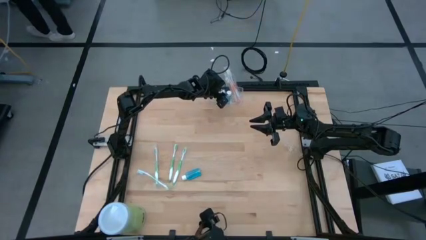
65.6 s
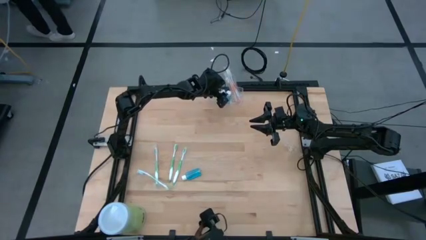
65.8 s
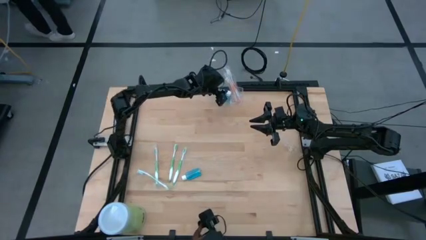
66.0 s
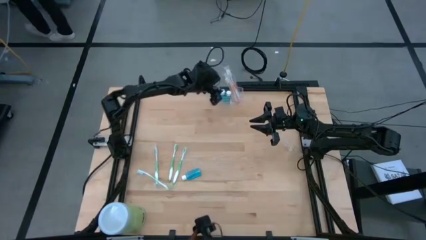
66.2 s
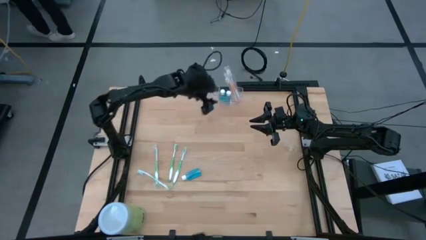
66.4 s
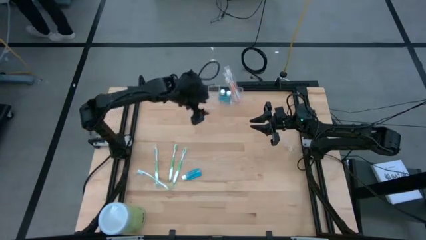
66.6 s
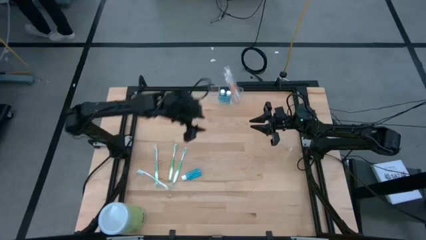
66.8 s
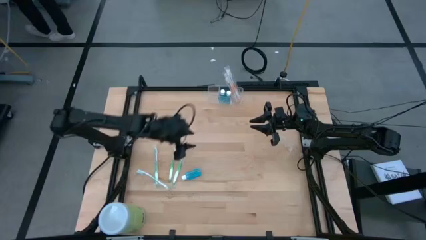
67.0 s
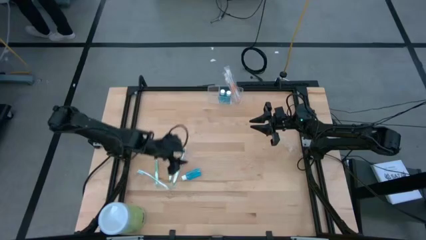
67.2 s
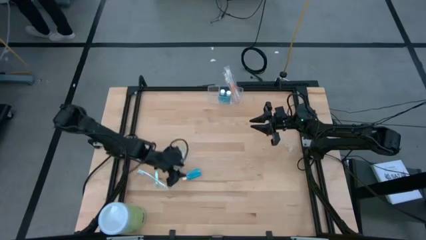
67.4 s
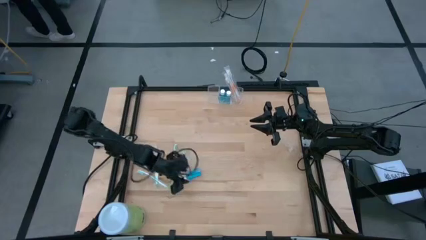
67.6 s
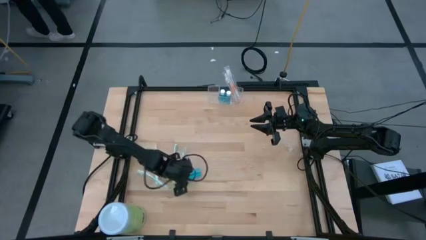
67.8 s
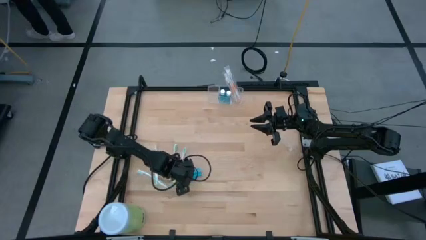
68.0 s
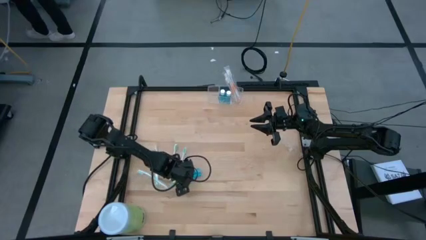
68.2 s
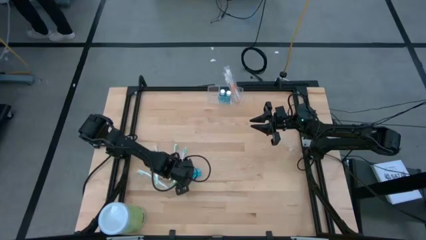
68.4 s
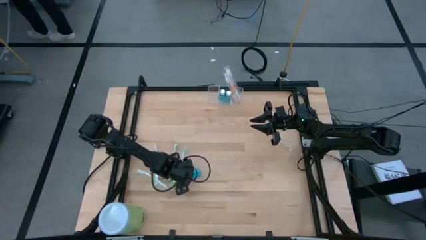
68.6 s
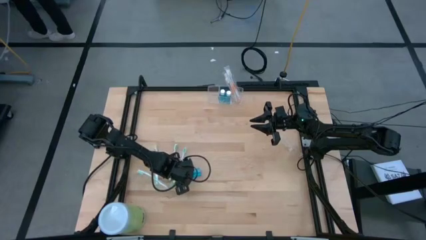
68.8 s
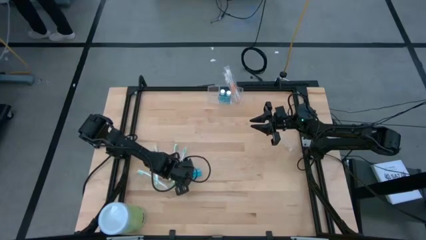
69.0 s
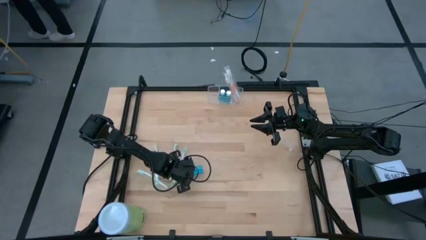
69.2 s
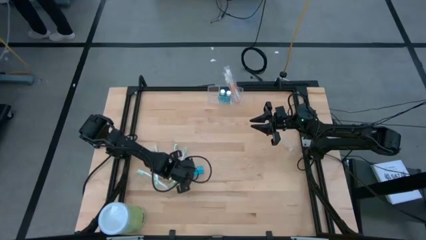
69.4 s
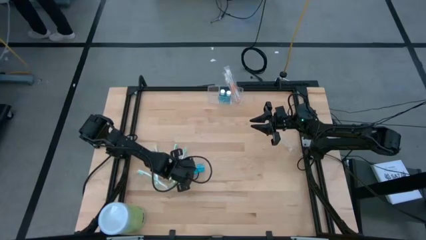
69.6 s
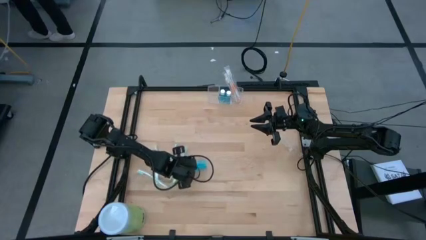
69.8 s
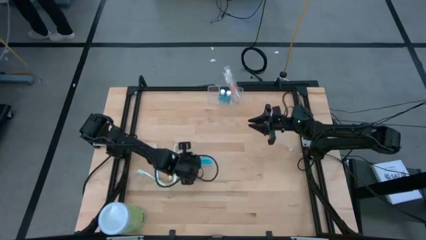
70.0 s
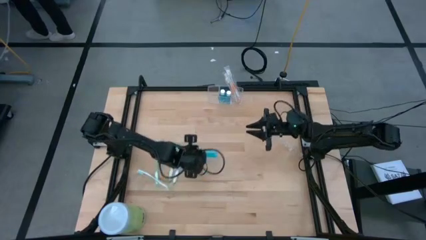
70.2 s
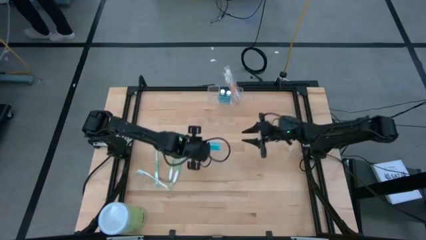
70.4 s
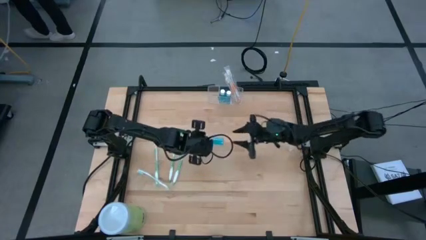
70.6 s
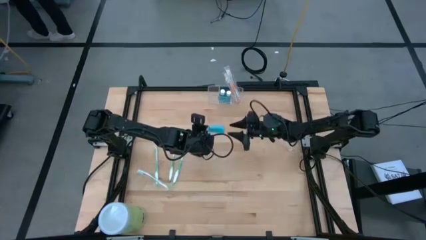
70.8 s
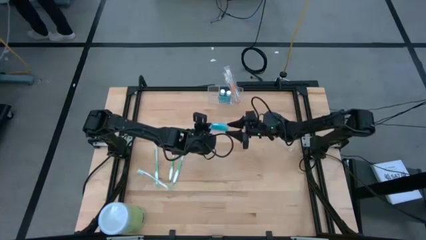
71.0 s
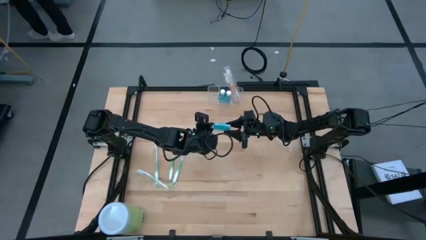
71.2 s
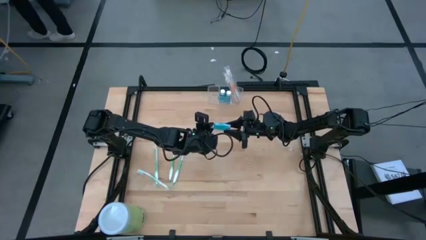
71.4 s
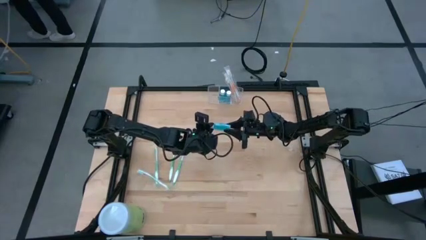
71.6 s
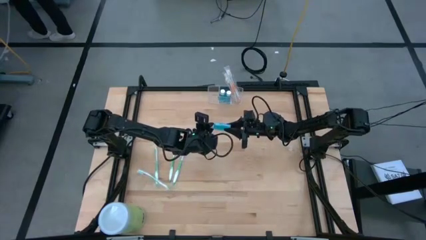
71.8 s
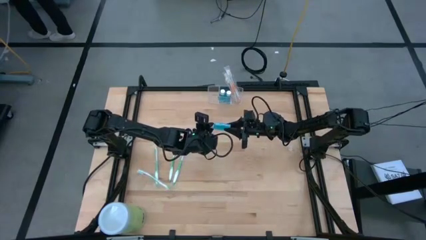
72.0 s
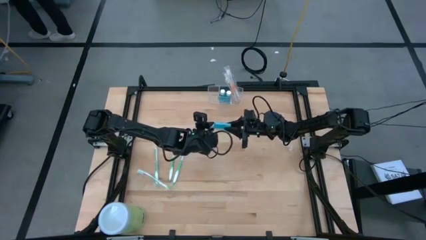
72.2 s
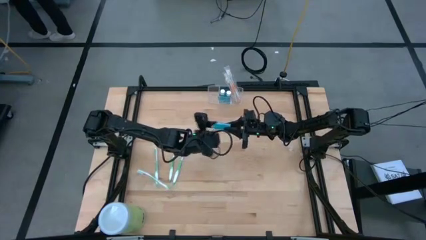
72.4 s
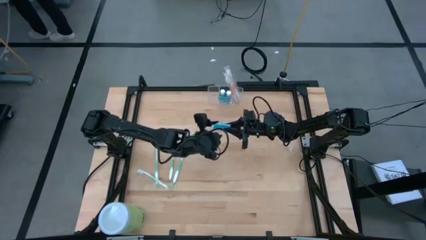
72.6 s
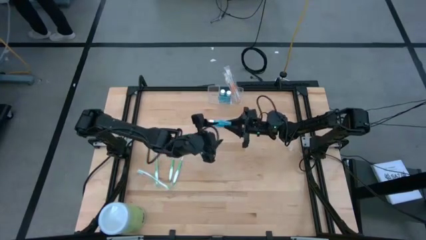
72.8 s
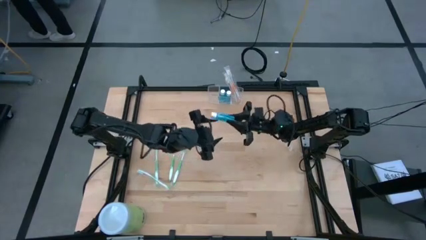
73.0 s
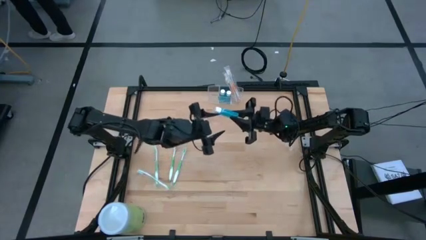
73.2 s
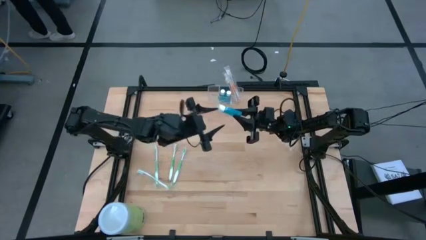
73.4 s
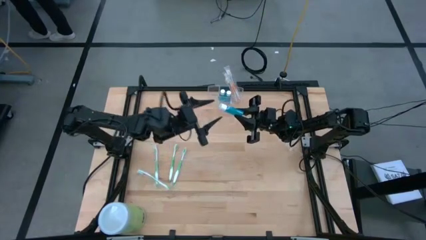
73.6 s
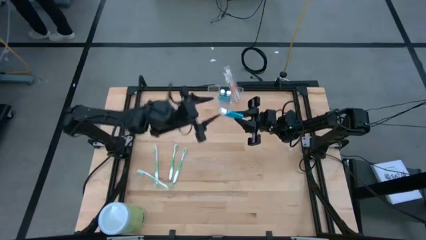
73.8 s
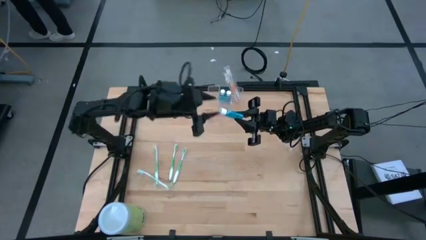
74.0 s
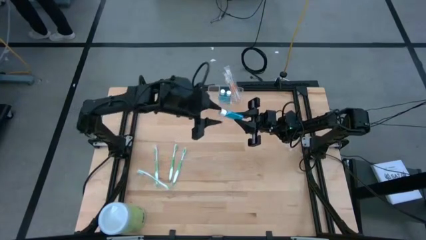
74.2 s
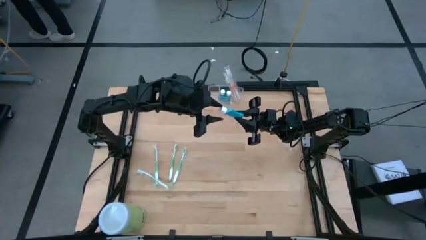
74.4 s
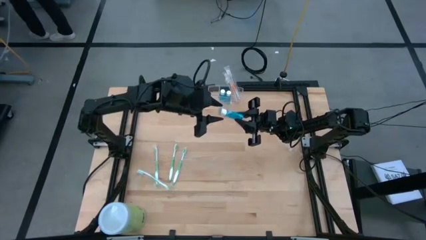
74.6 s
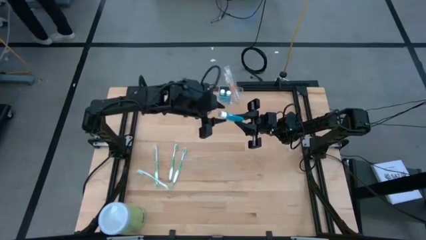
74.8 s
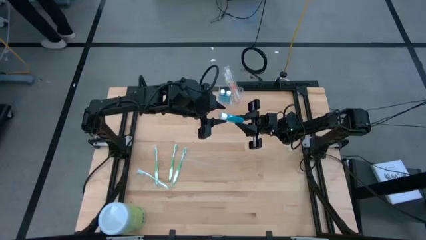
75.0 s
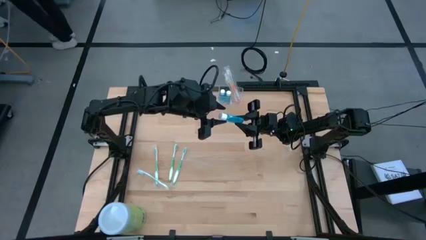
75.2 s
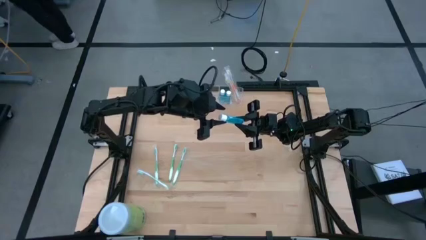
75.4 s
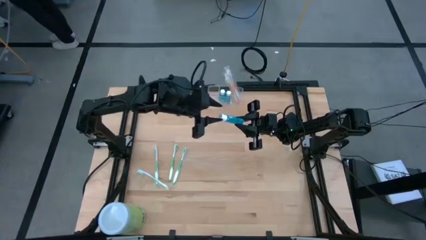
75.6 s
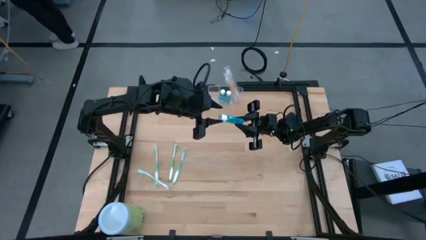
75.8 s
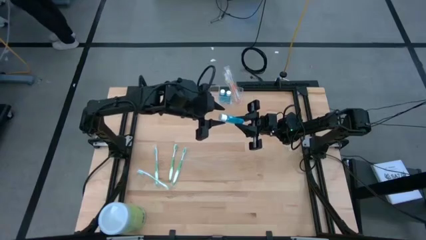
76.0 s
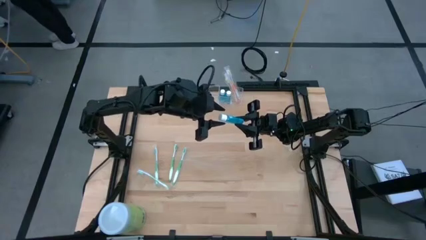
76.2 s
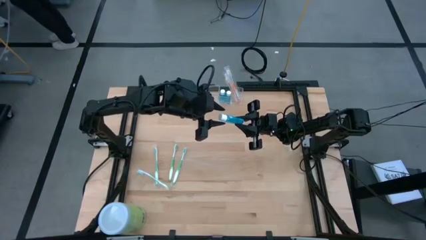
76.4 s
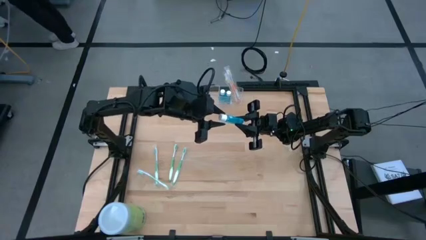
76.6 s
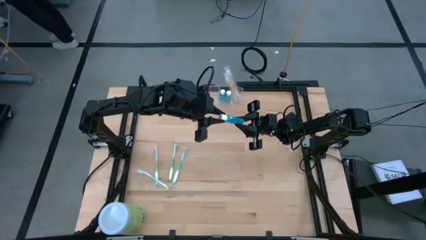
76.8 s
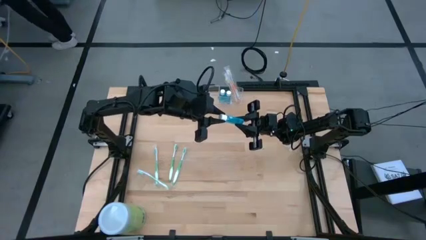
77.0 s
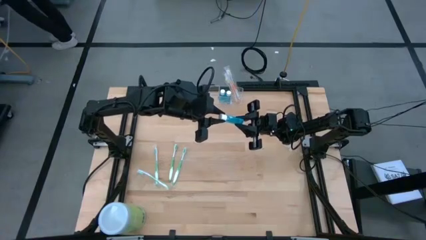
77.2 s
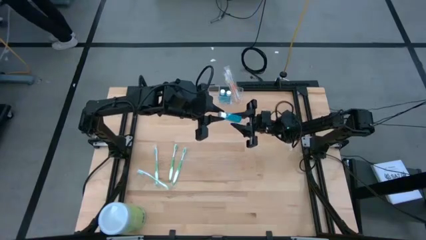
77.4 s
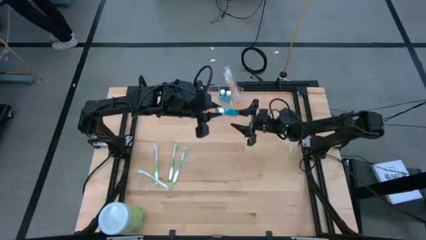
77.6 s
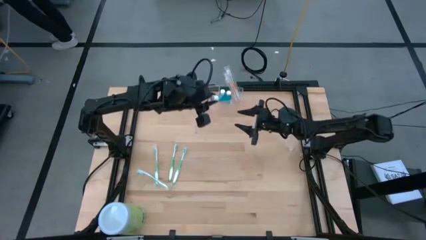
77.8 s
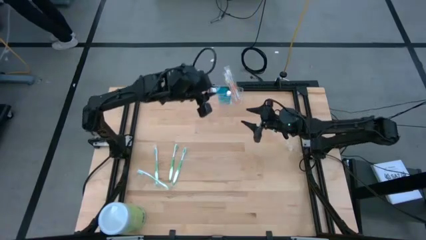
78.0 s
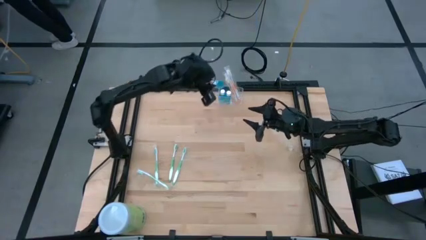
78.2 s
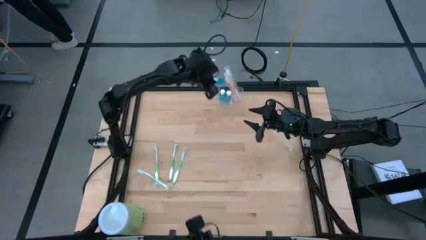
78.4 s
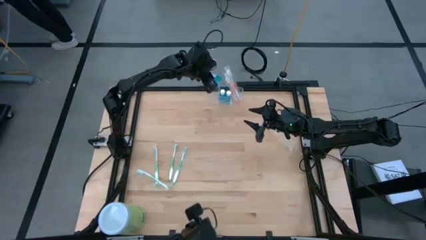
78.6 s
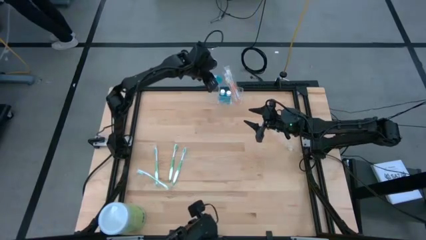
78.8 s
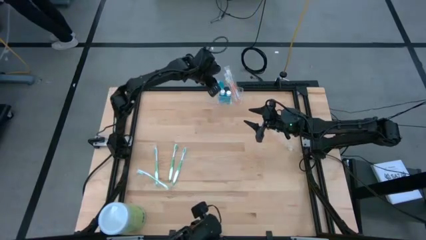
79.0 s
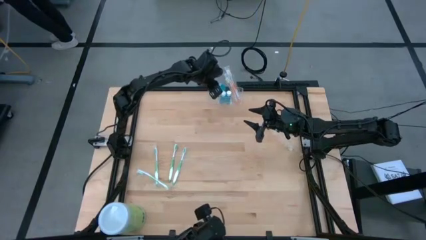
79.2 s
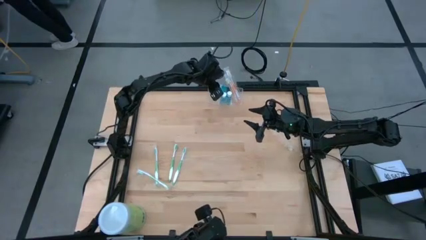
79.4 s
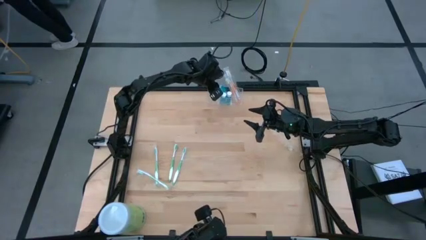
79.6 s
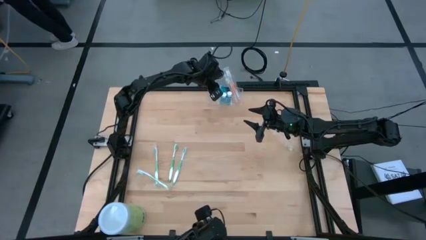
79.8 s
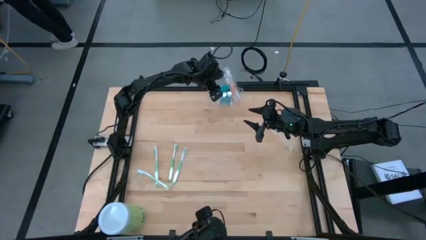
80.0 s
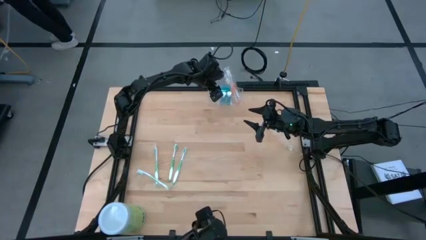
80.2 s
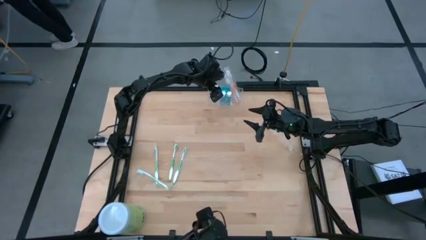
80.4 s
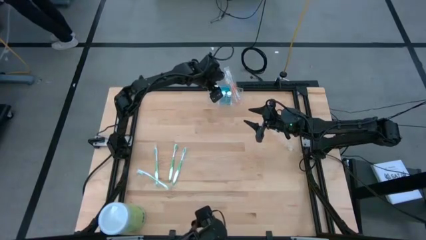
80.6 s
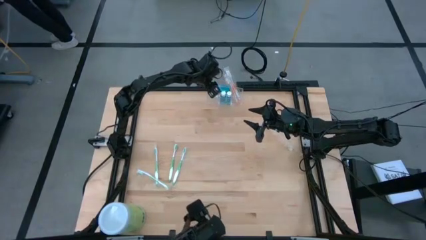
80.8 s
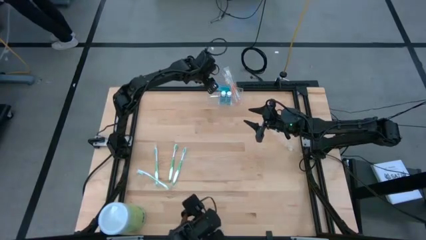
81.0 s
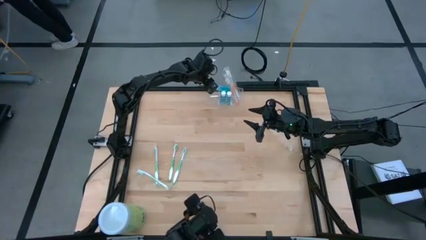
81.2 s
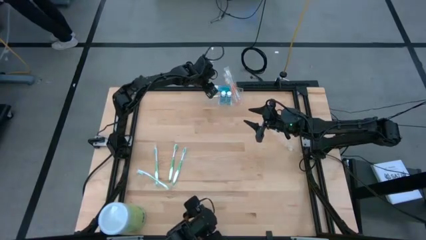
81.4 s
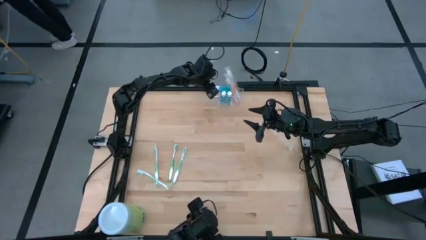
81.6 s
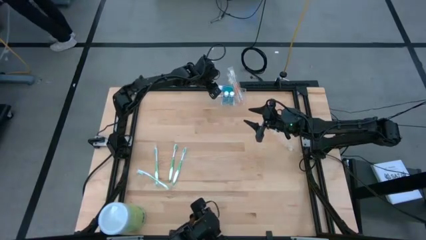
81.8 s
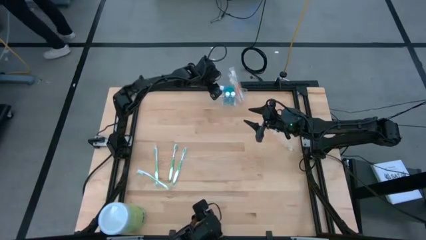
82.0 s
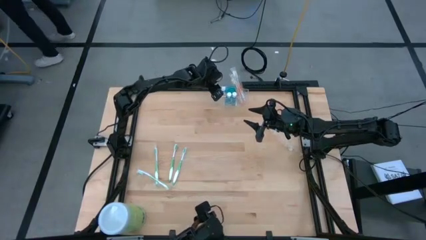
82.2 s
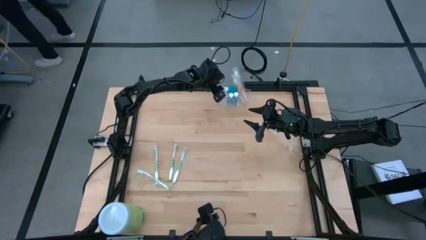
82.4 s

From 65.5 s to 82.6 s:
Task: Pick & Place toothbrushing station
Put the blue mouthwash into the transparent organizer
